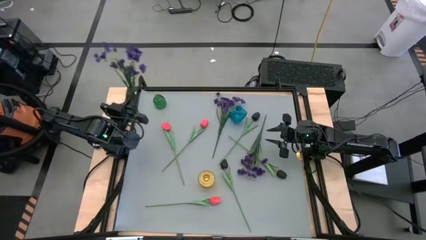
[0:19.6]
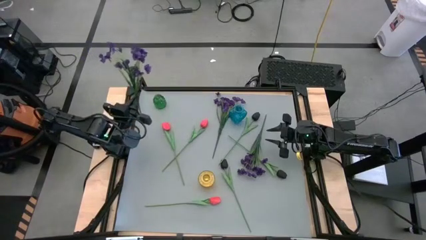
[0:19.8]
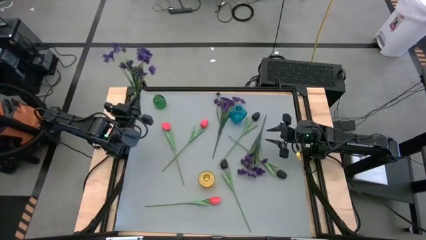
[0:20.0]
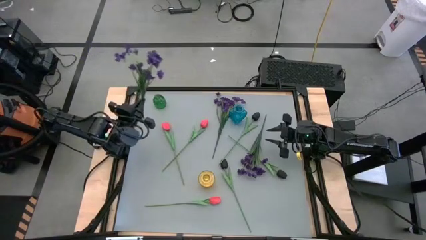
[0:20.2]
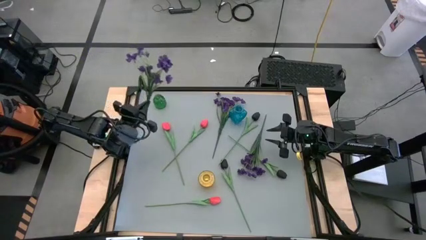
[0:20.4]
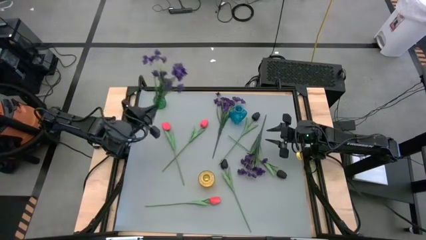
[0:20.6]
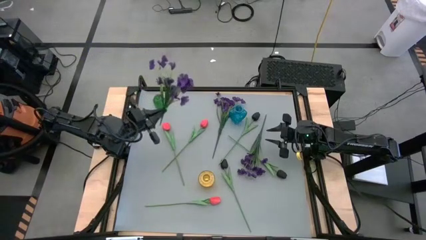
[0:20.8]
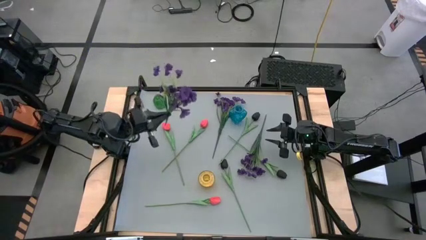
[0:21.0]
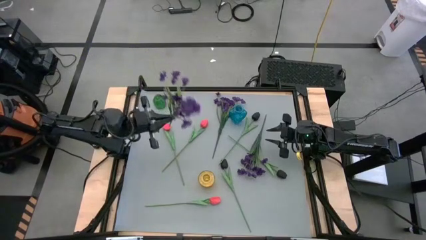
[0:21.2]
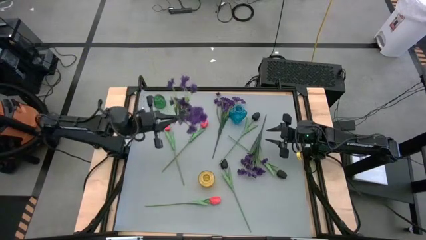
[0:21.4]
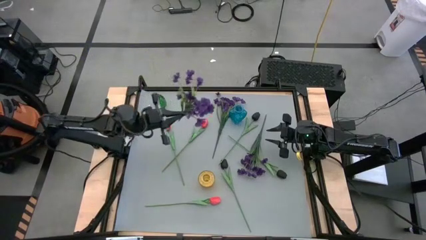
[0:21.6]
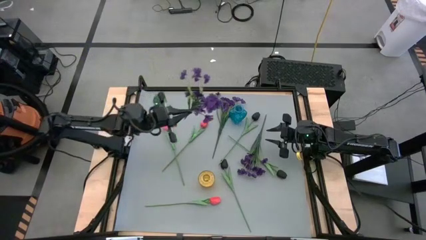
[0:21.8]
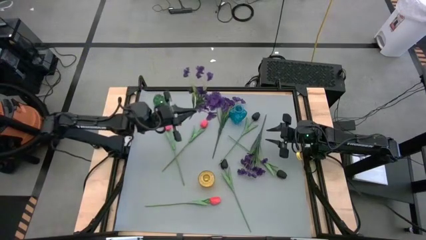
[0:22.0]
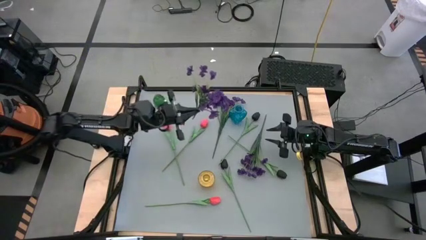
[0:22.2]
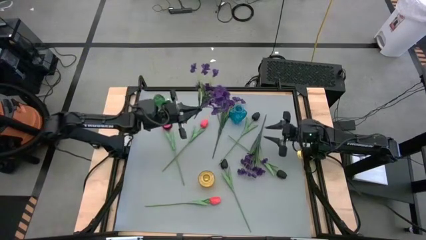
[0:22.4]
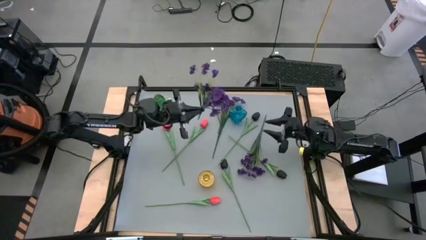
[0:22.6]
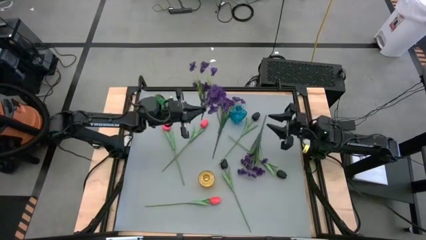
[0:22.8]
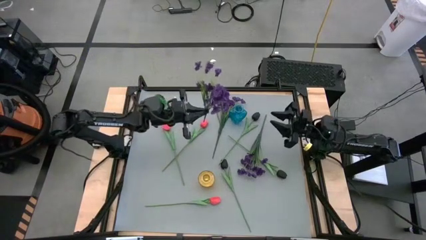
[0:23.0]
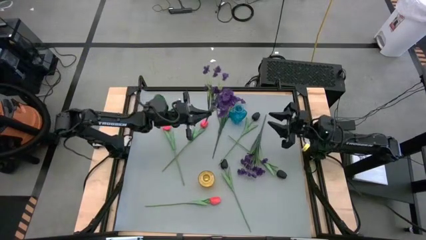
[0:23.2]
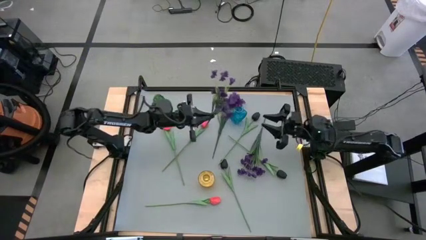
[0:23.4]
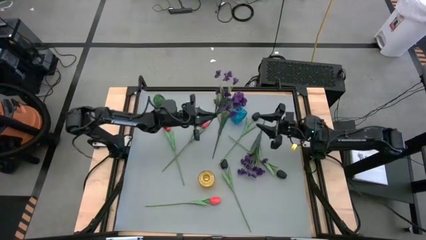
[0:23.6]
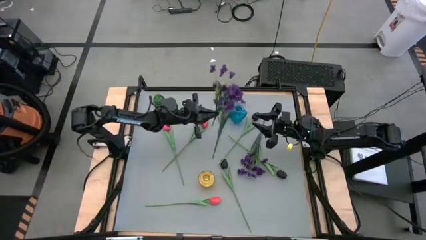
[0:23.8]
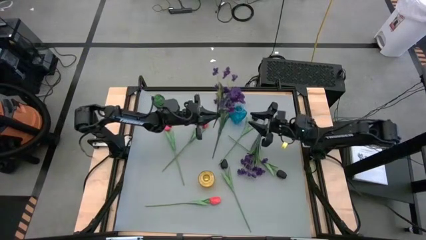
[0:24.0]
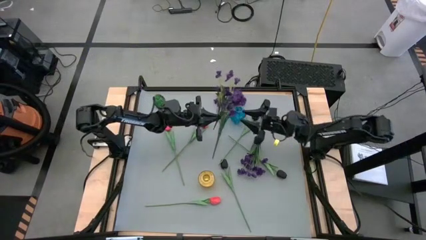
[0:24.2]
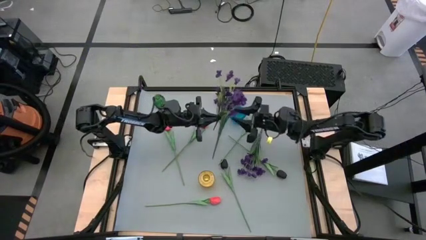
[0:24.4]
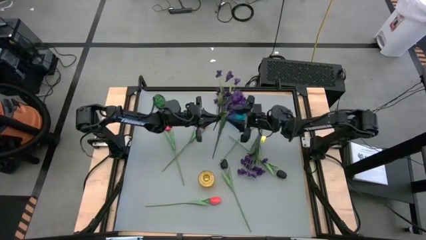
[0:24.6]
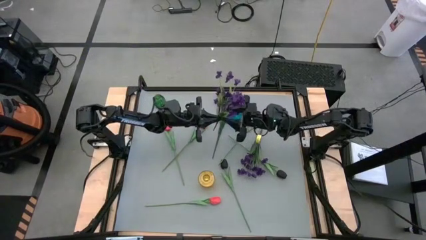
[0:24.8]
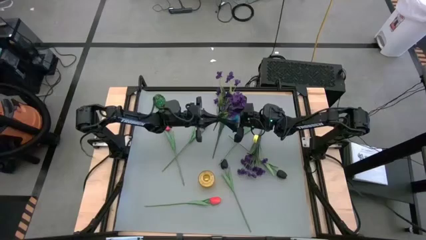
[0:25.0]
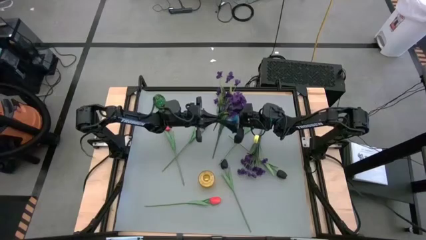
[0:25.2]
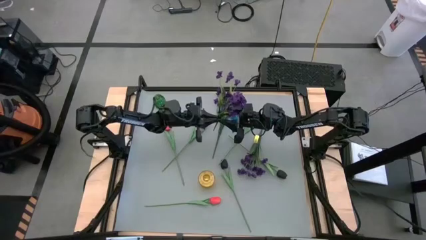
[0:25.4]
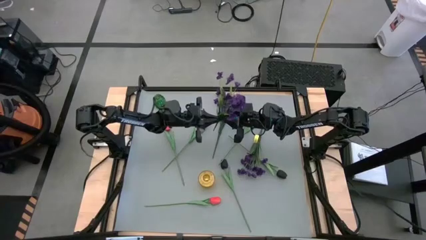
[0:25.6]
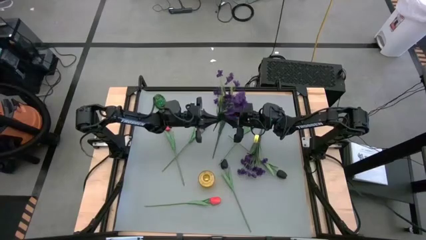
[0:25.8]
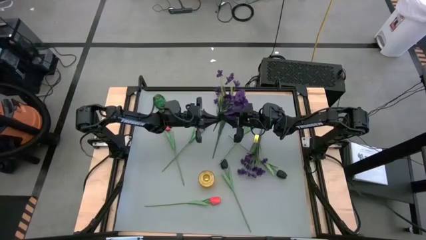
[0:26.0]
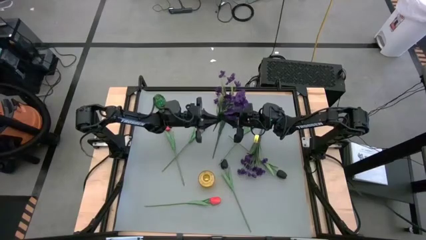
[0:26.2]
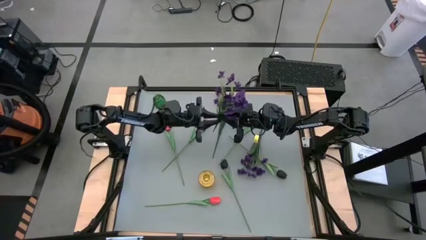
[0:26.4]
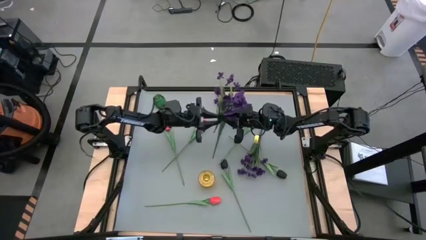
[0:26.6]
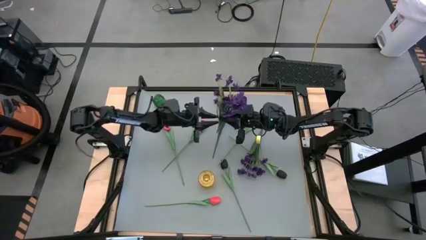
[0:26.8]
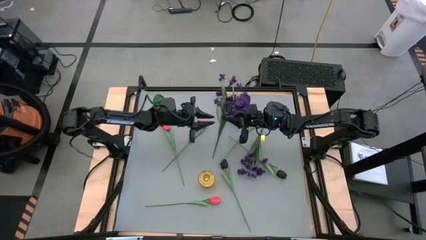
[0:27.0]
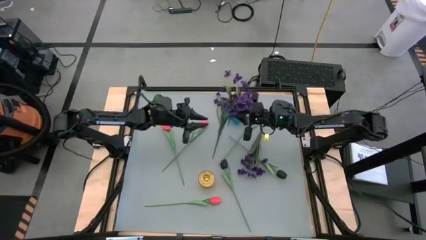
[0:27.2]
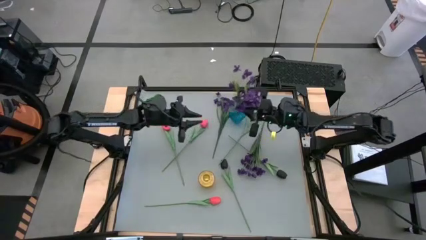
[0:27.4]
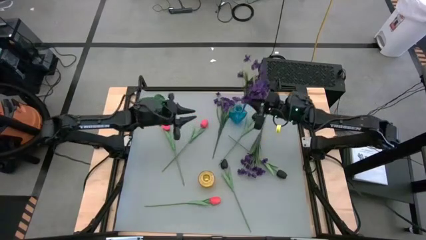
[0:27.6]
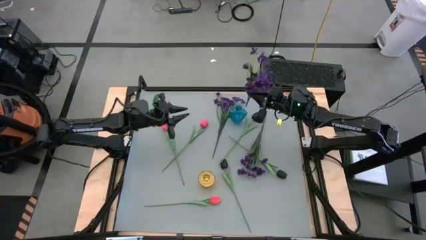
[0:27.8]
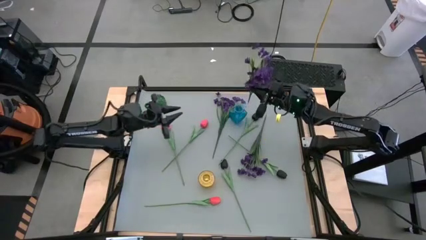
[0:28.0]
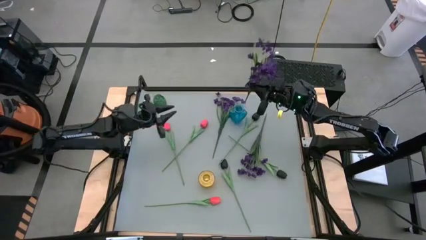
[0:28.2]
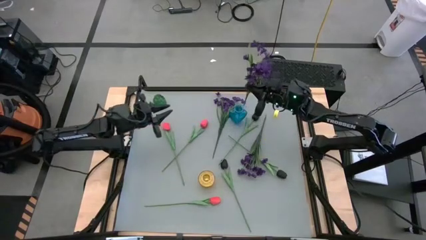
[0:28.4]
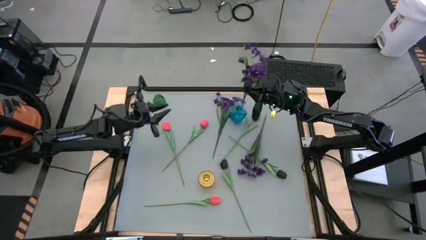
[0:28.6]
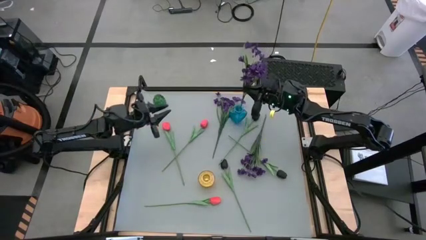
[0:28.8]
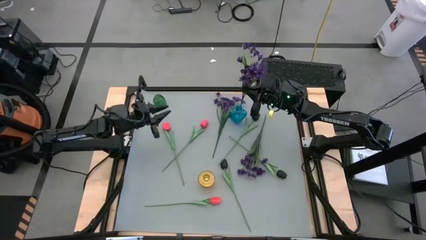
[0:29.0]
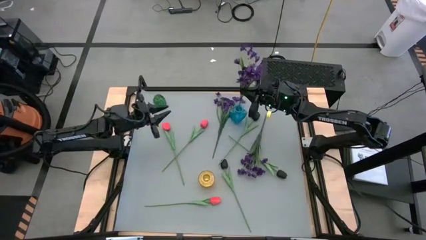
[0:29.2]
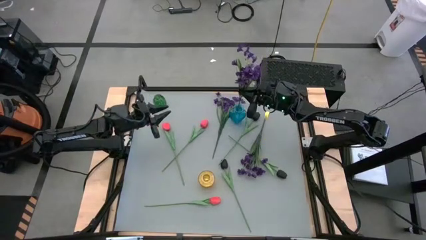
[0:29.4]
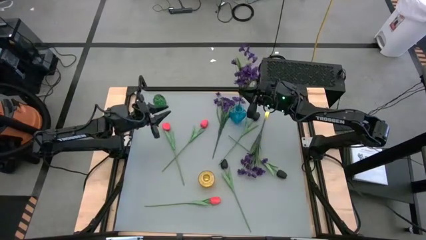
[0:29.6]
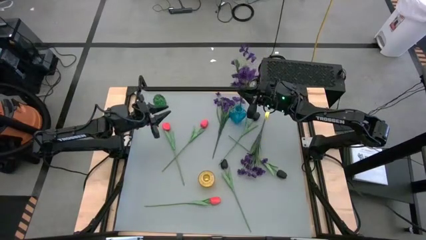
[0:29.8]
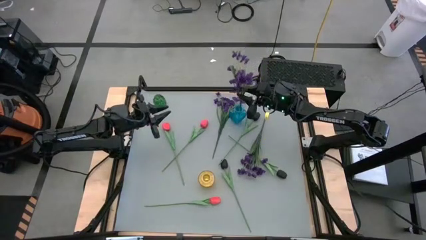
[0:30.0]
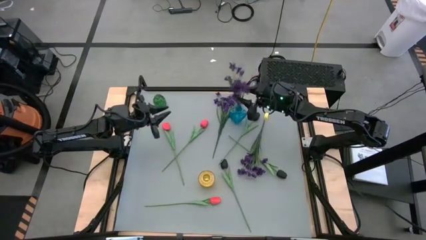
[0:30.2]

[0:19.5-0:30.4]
Task: Sort flowers into vase by color
Put the left purple flowers into the blue vase

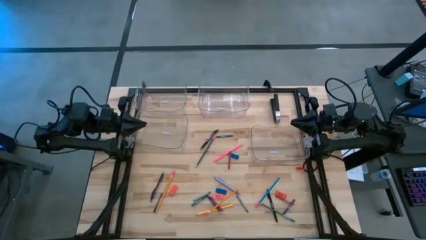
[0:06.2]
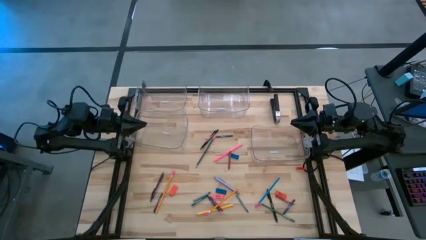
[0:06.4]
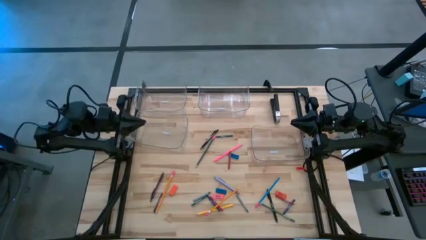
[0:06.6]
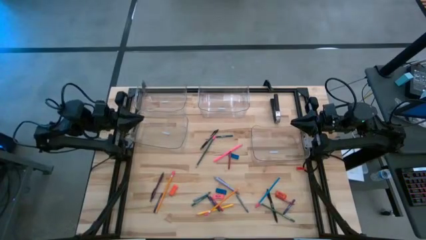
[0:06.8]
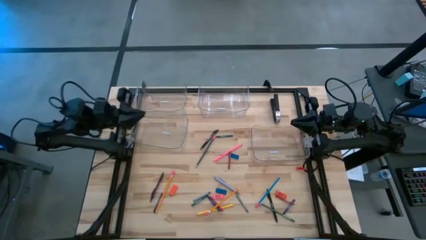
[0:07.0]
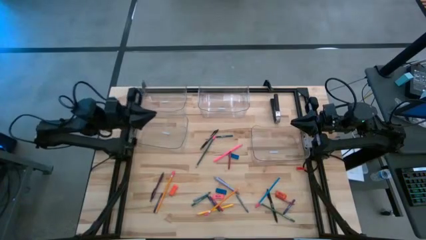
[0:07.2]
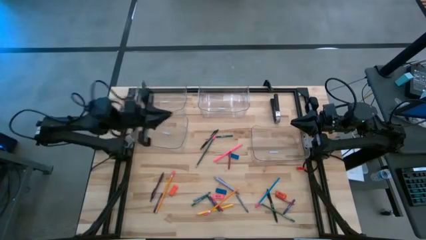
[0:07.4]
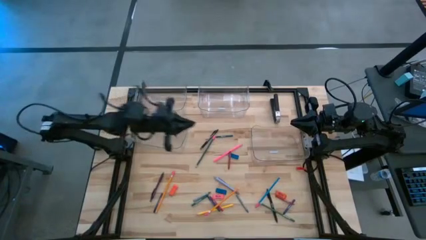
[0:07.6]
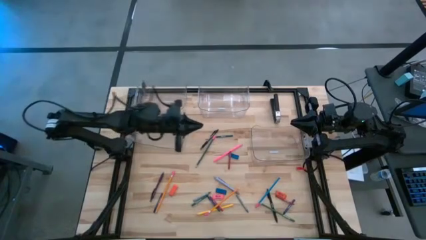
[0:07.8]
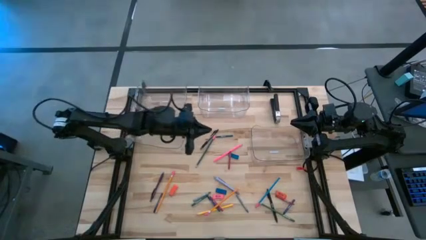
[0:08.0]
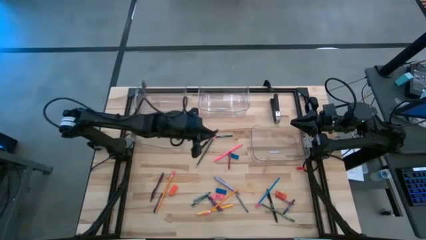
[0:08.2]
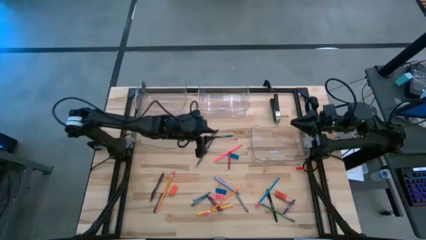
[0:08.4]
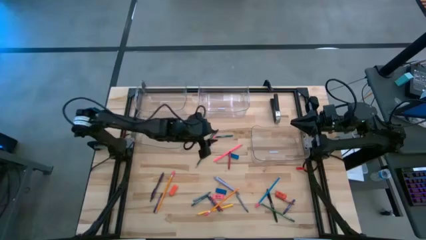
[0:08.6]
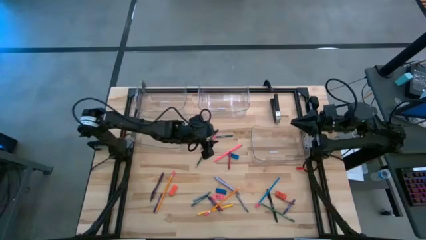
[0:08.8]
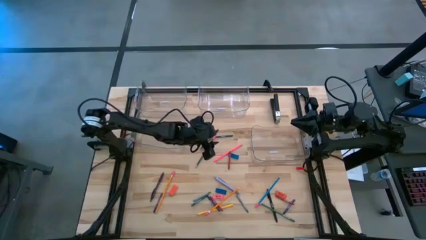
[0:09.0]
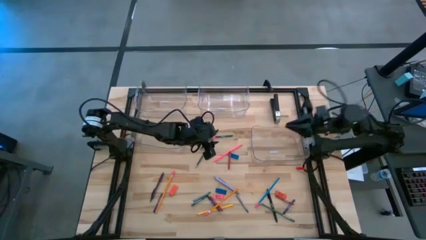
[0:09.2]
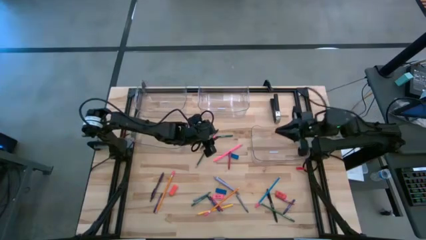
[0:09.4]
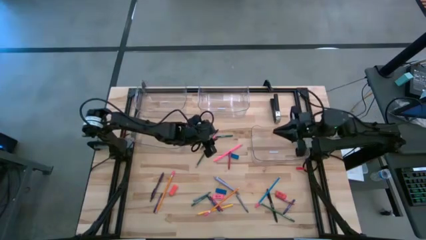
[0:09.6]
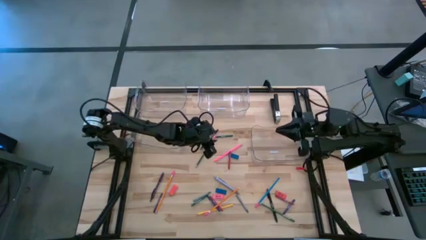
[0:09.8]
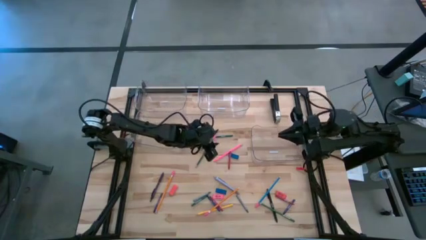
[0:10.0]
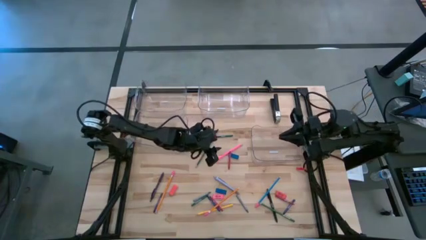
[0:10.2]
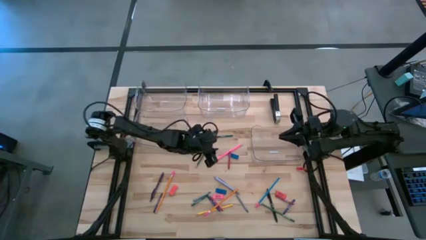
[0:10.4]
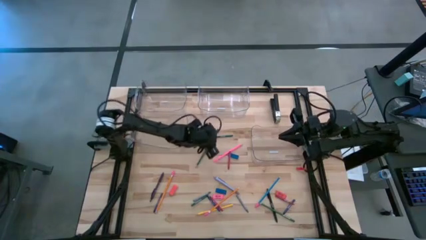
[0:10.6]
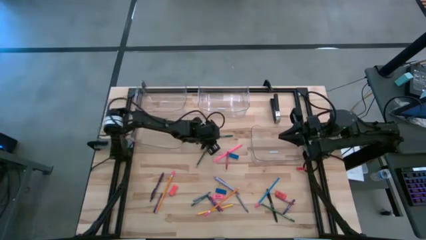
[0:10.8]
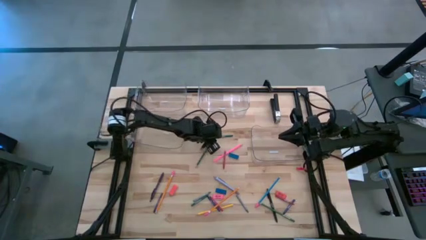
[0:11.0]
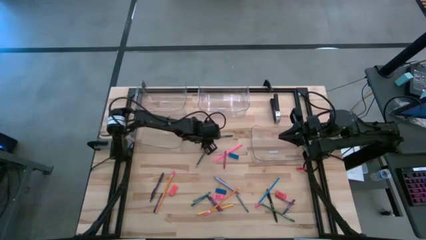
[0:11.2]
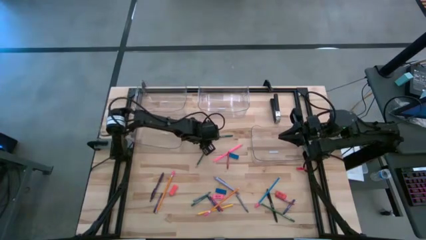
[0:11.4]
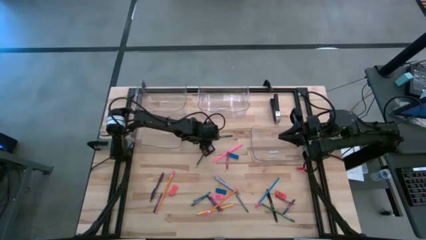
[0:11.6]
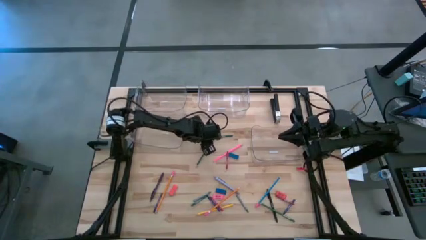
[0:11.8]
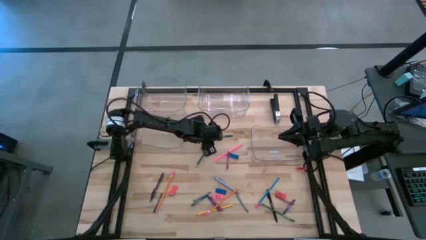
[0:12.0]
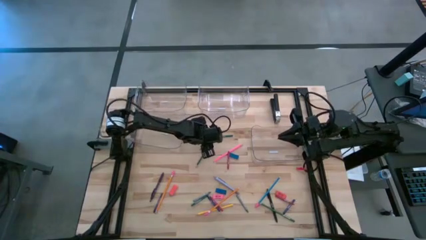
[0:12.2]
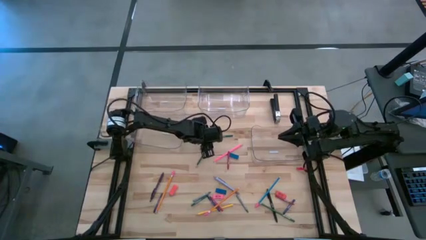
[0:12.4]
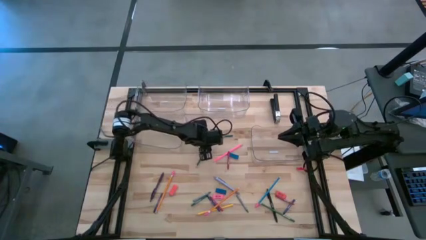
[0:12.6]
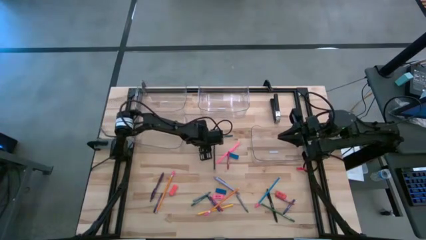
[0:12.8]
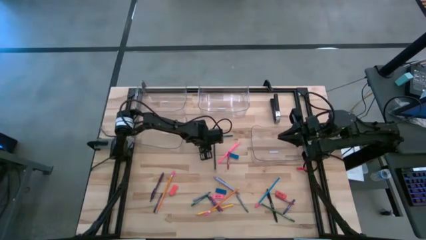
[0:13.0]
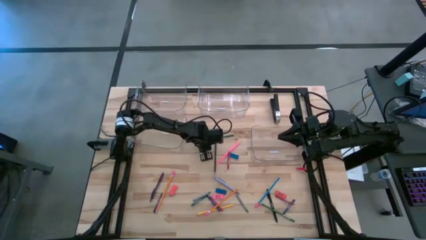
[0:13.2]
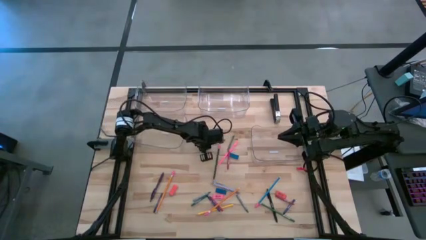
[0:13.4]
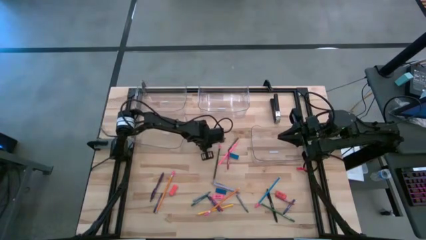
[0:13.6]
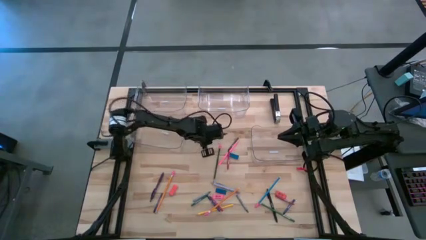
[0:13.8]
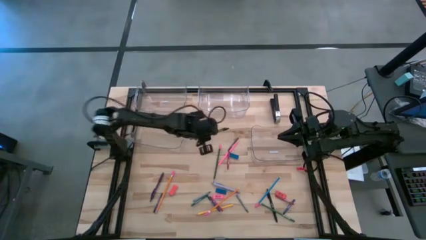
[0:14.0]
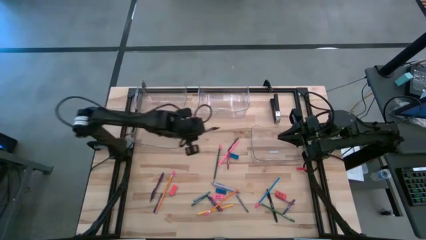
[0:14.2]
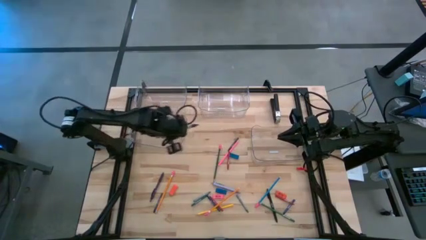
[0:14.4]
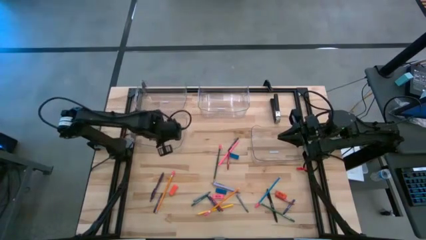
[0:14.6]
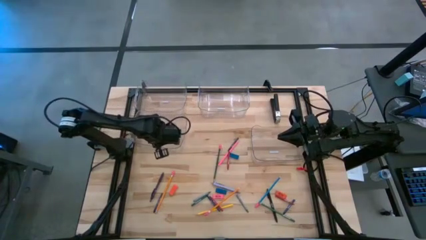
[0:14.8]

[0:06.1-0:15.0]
Task: Sort crayons/erasers/pens/pencils in bins
Put the black pen into the bottom left transparent bin
